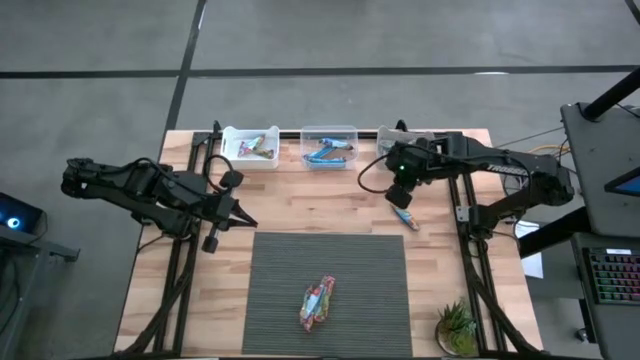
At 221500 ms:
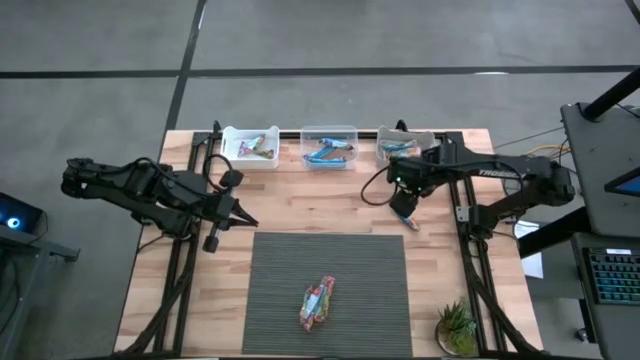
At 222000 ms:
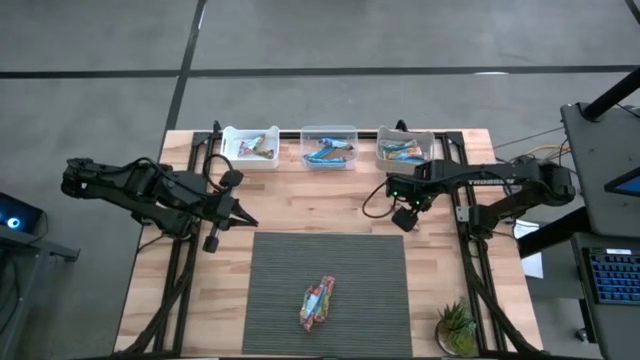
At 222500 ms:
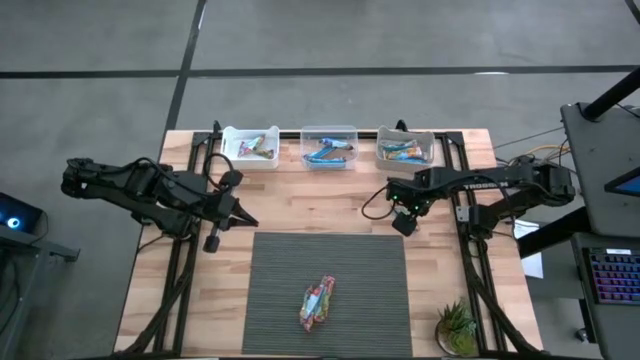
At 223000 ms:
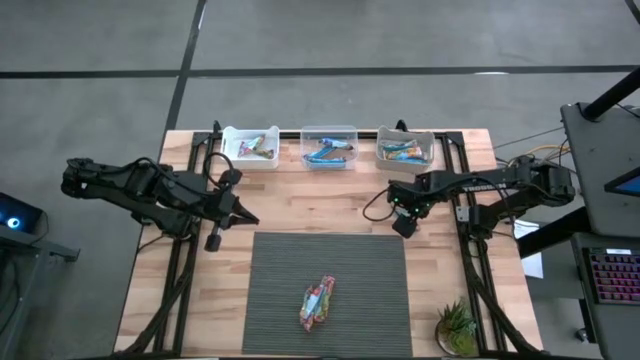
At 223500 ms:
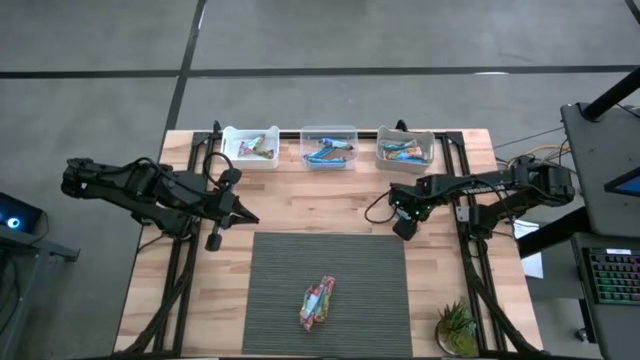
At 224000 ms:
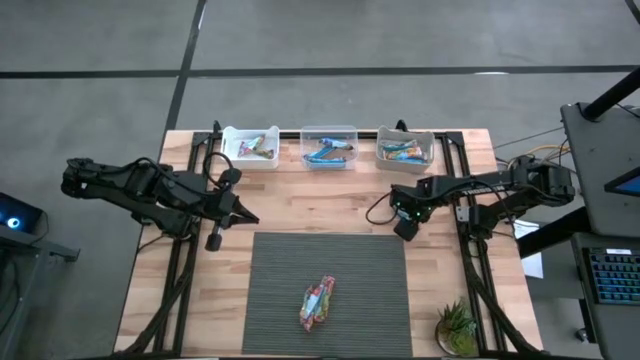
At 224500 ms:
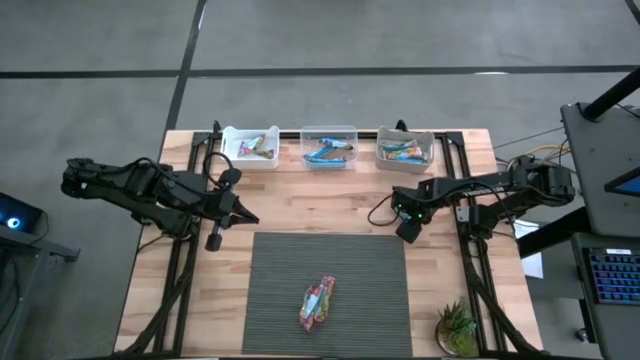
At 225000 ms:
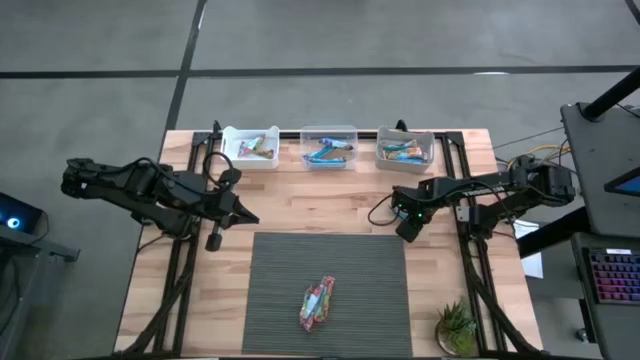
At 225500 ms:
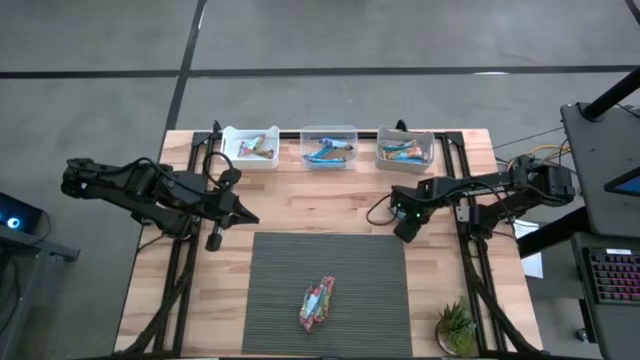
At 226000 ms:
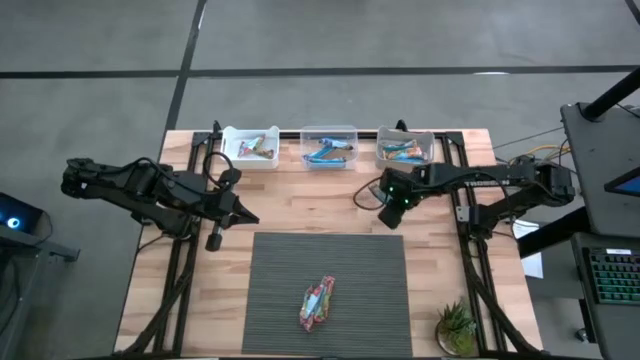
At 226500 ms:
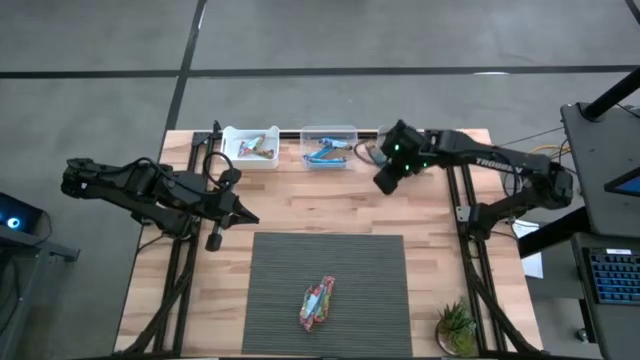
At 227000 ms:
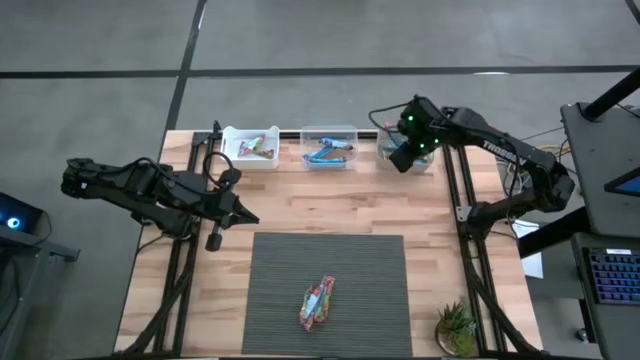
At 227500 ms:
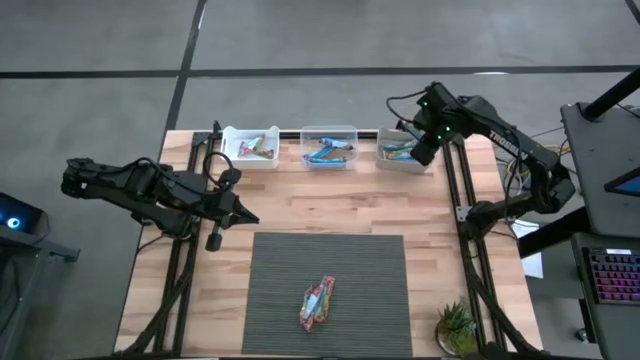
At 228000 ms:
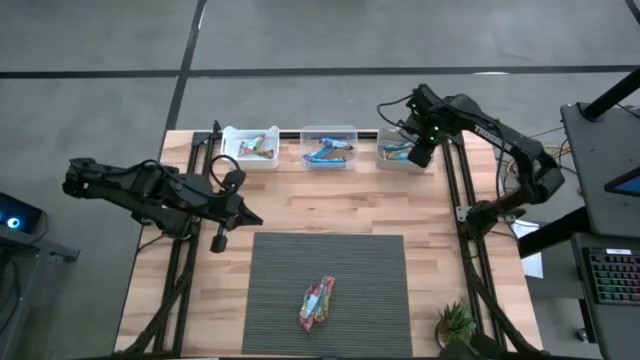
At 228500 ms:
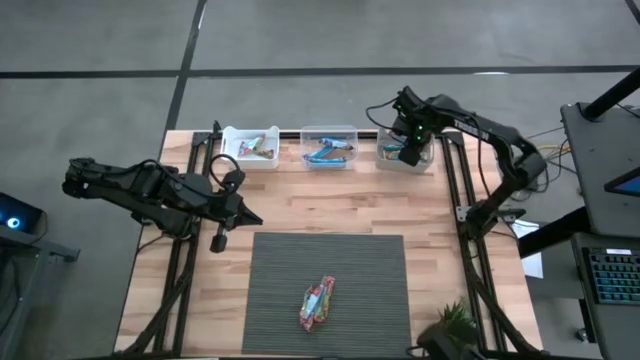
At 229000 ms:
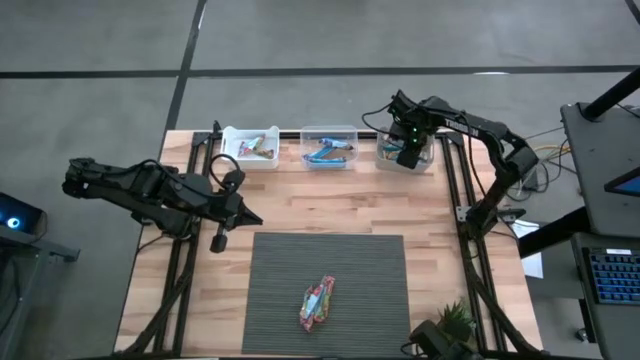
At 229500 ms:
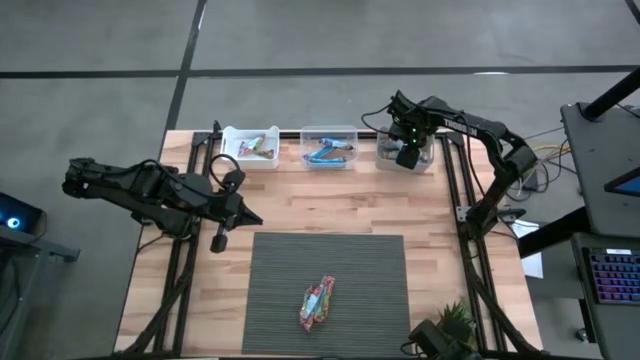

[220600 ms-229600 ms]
Task: Pick and place Granola Bars by type
Put the yellow granola bar into the gray bin

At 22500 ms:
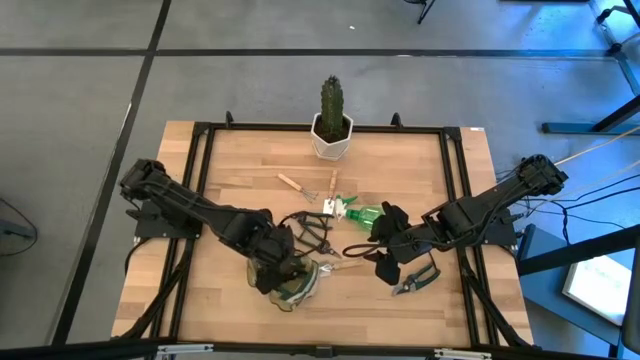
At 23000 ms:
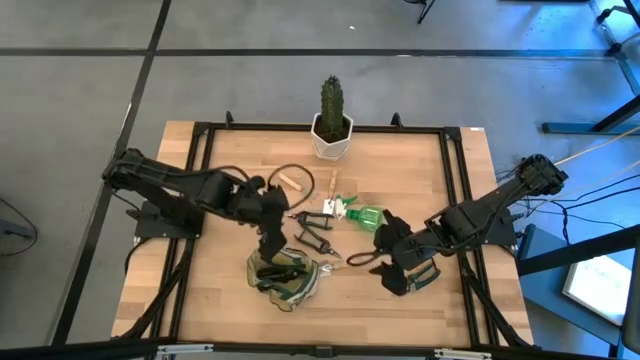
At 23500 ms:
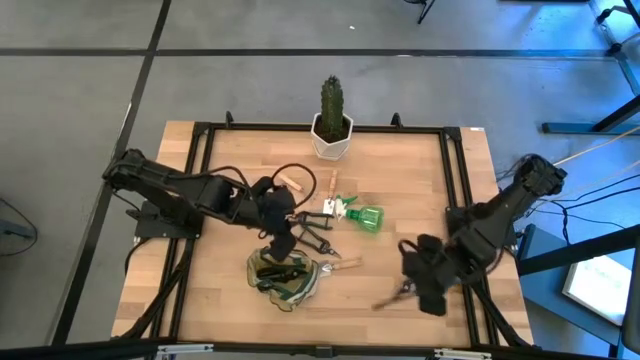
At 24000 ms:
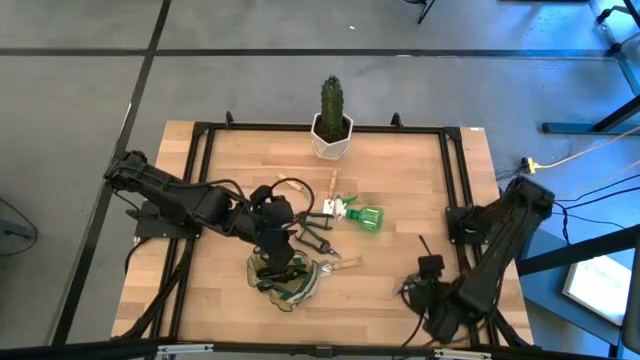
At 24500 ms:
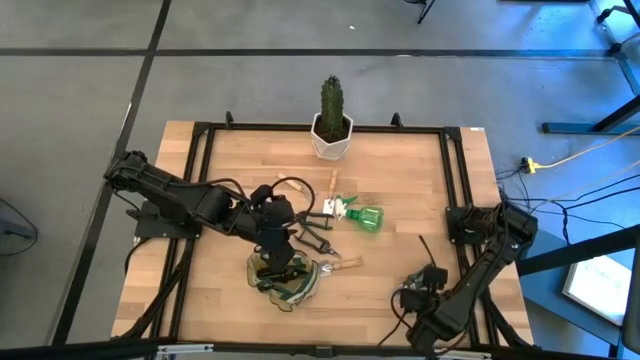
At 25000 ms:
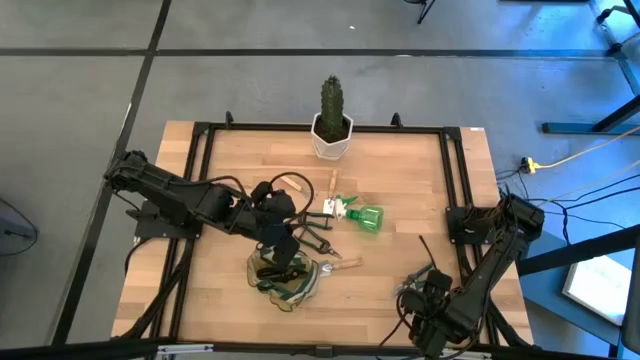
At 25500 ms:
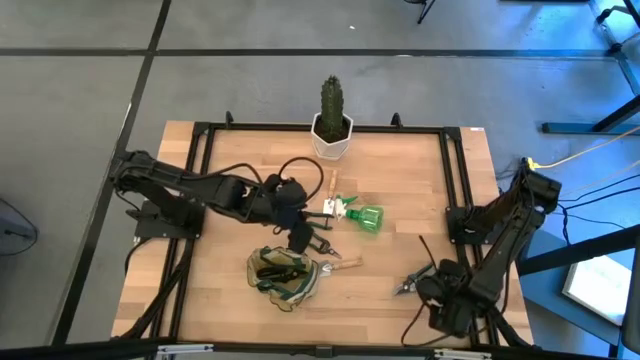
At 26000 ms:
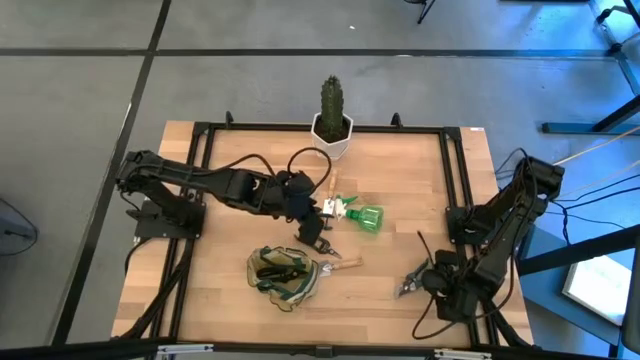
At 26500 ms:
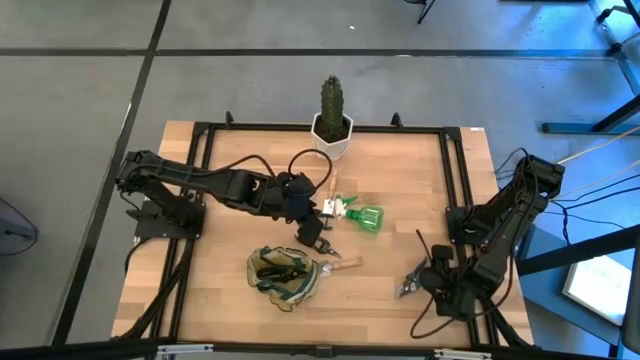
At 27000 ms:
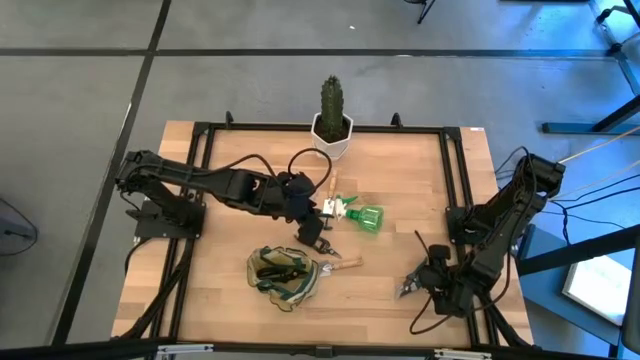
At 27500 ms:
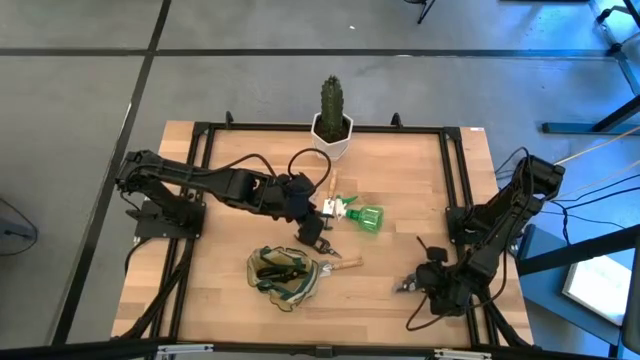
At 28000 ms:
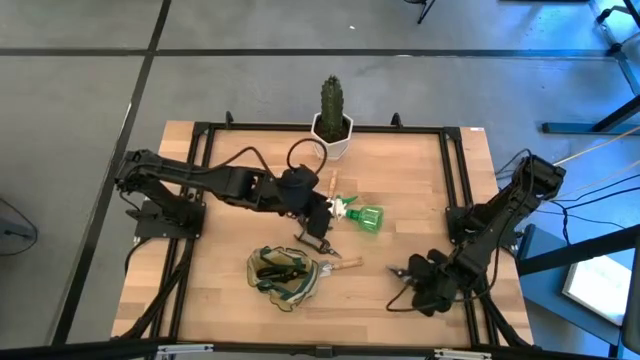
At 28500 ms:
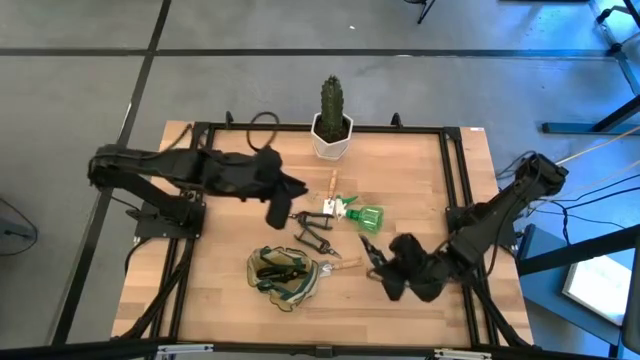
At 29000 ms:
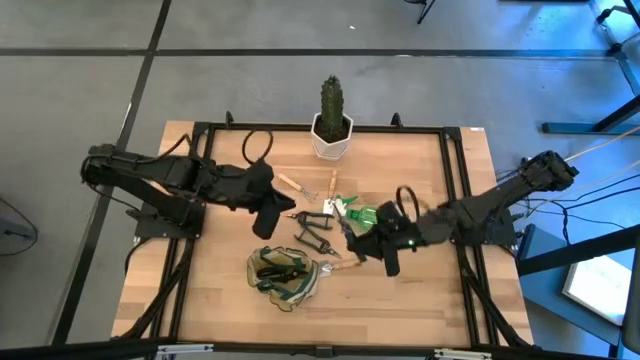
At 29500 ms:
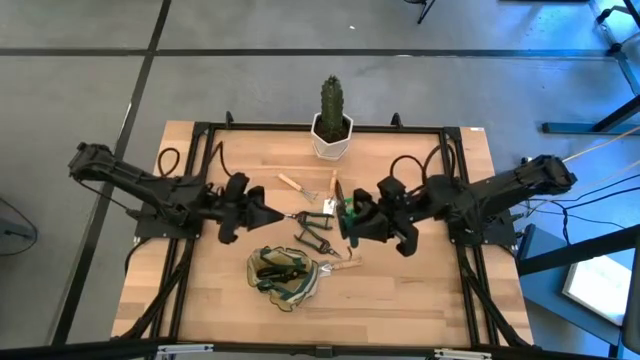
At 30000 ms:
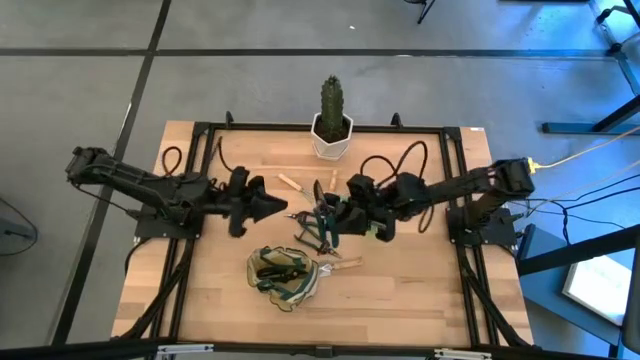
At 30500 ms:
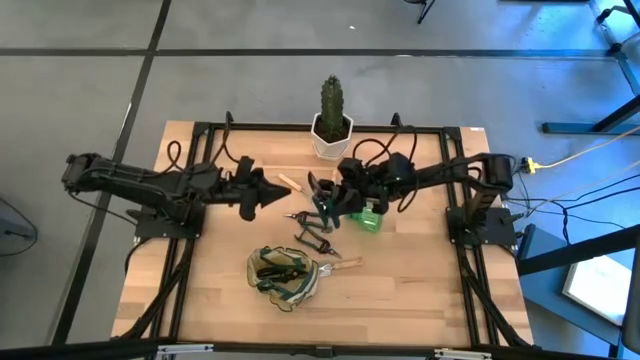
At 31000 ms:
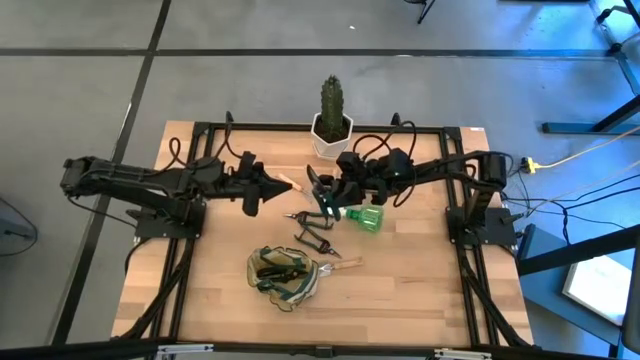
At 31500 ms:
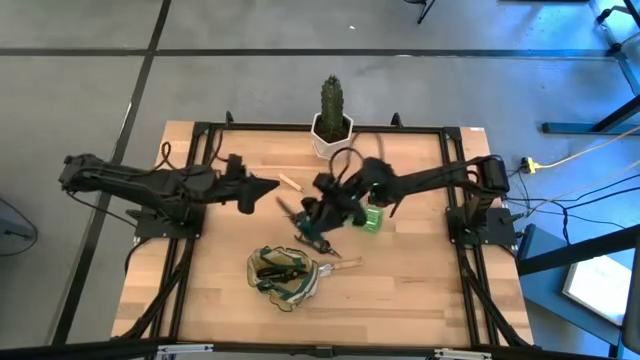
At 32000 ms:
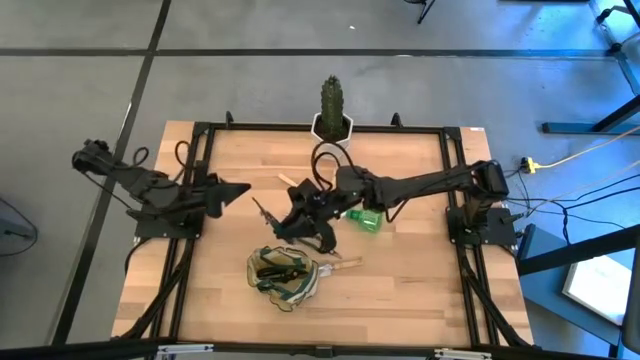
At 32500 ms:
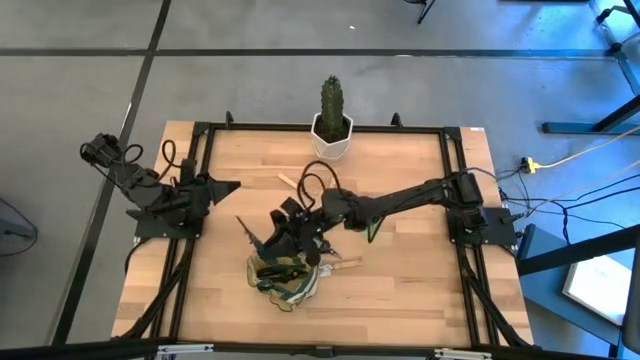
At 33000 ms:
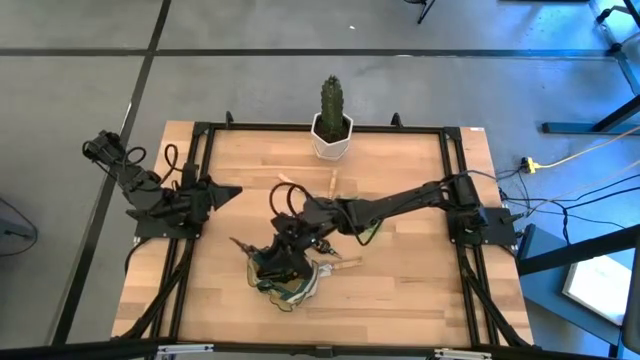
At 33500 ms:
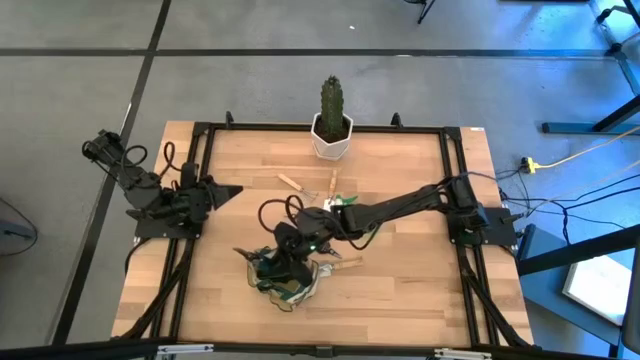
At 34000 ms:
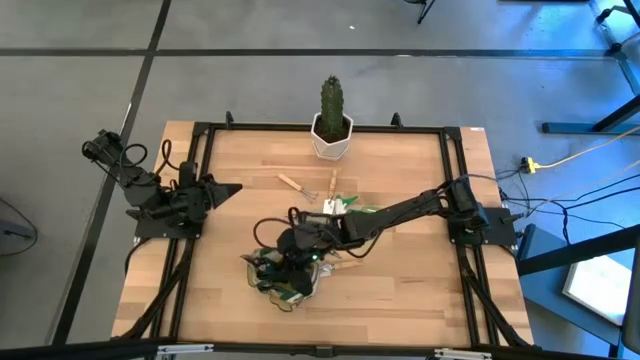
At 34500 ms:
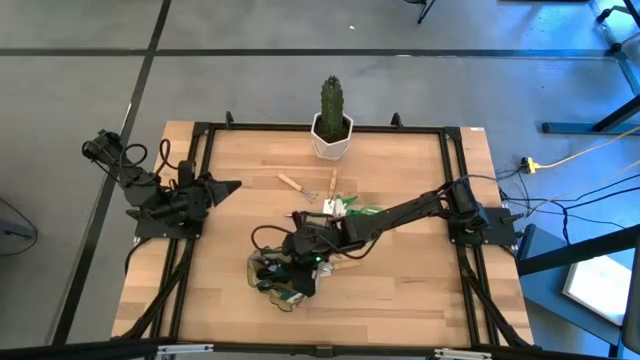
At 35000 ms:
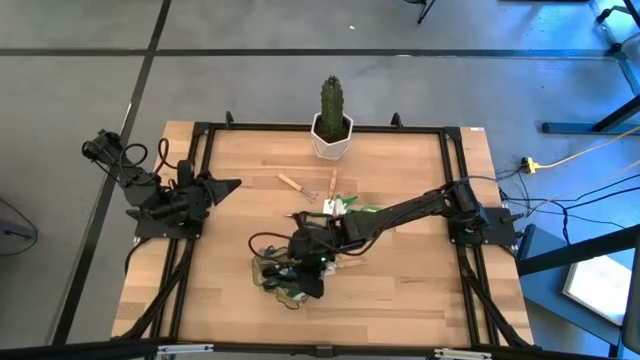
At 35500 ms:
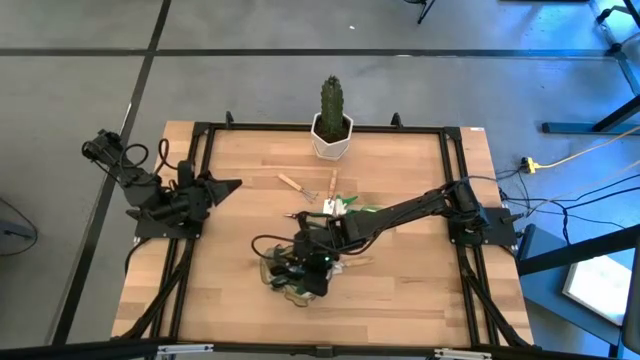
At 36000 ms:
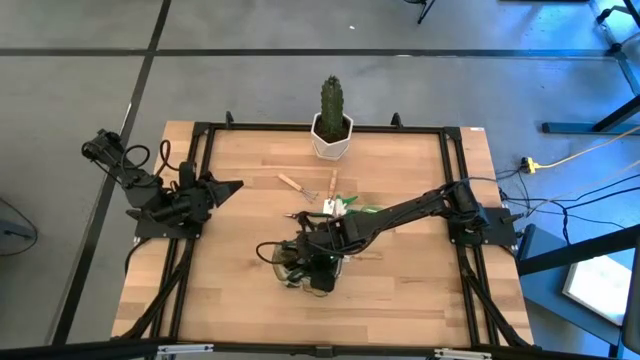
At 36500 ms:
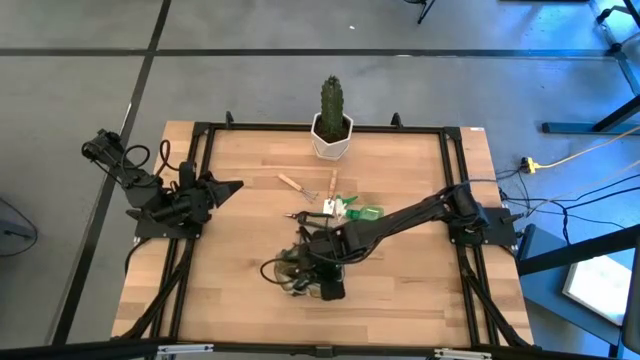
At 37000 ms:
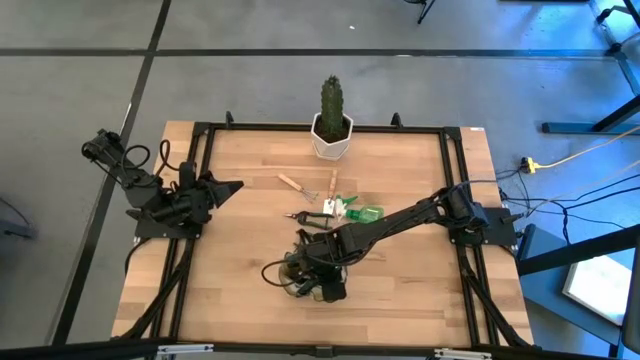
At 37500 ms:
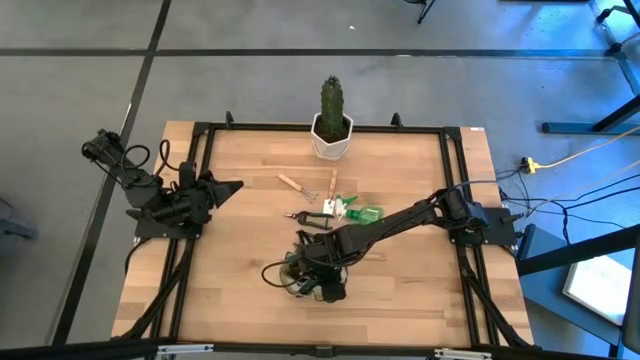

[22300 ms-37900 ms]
Task: Pick & Place Garden tools in Gardening bag
Put the shear scissors into the gardening bag
